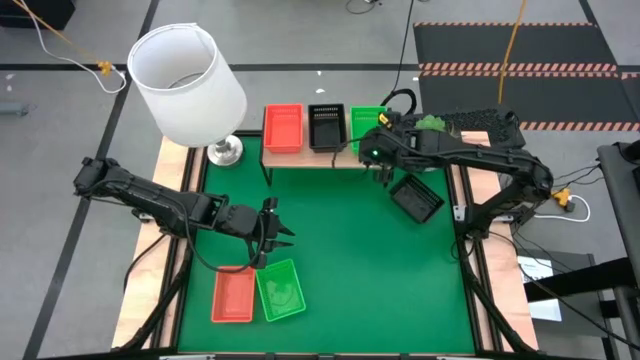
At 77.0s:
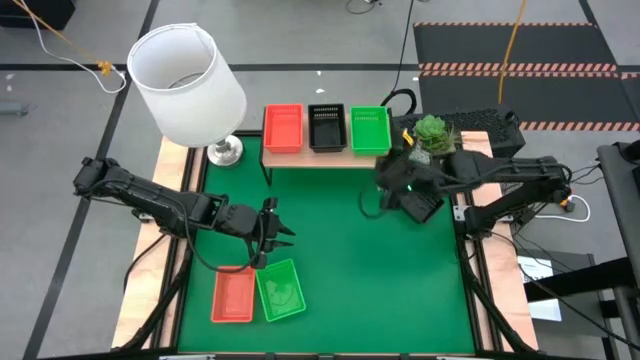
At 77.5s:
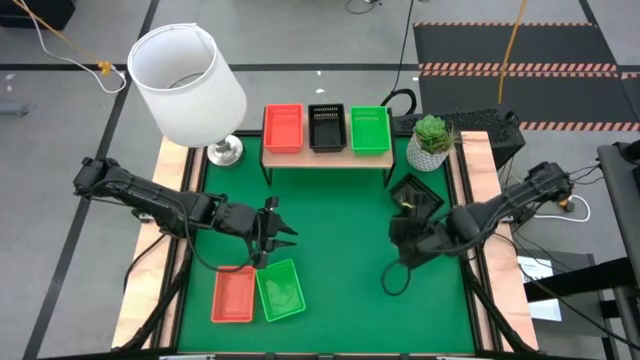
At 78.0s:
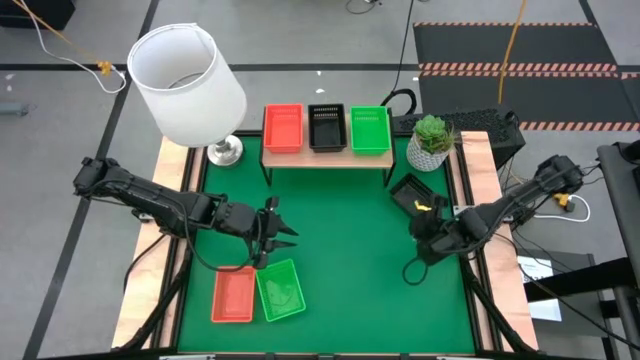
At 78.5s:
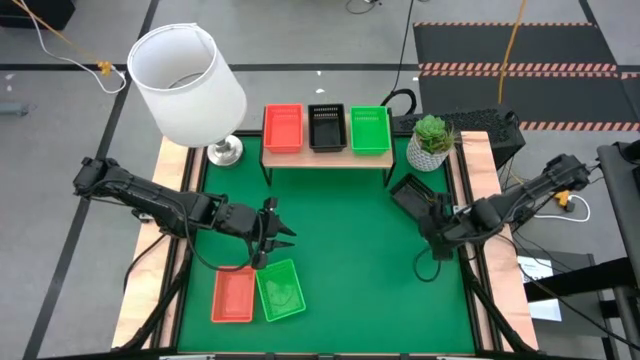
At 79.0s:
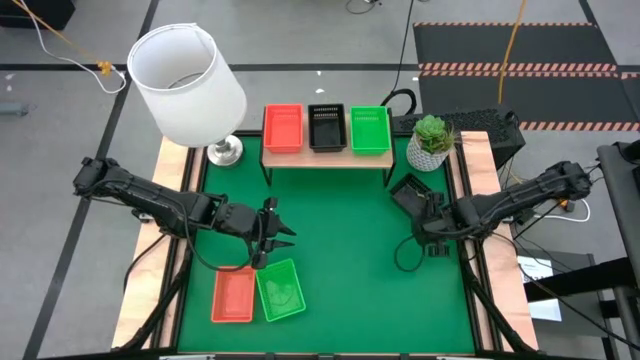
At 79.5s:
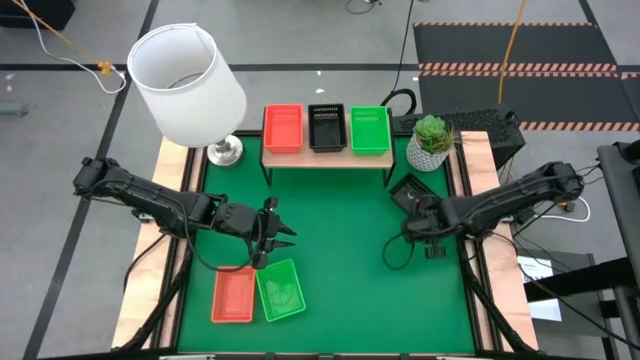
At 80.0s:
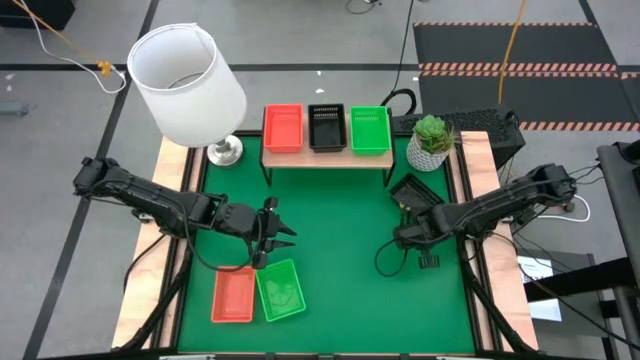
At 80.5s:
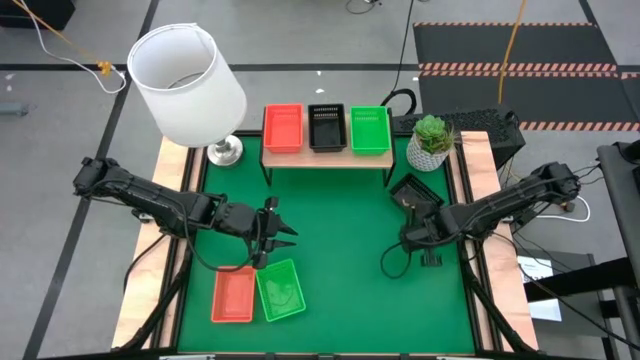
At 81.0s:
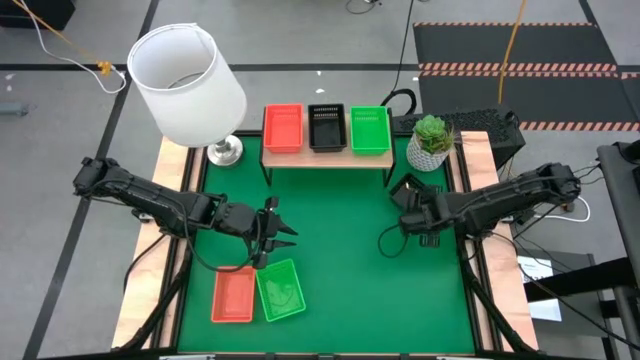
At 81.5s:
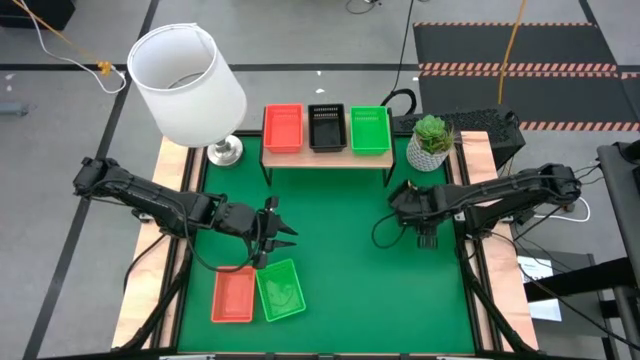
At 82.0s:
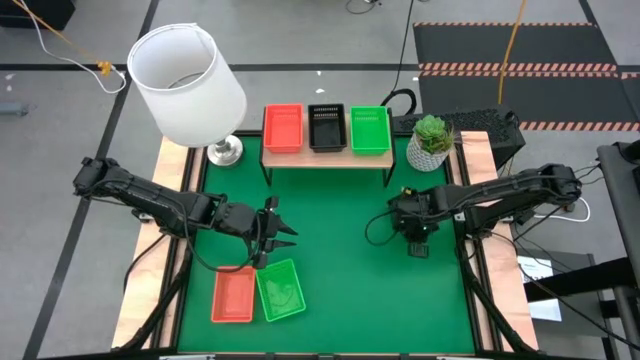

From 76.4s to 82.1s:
Task: Stack baskets on shelf by color
Stack the black basket into the black basket on the shelf

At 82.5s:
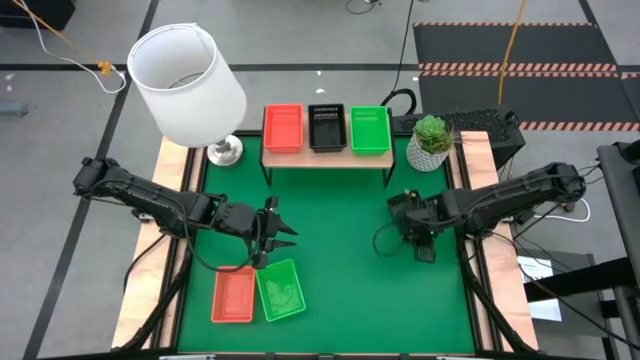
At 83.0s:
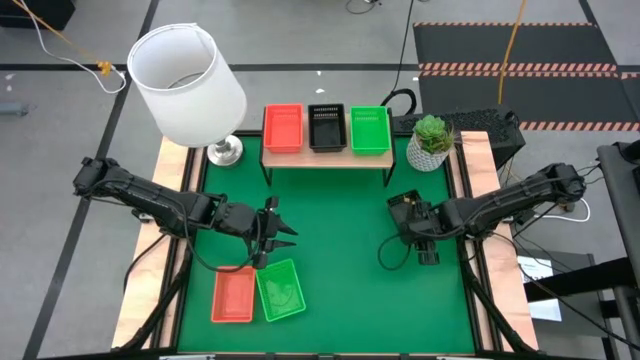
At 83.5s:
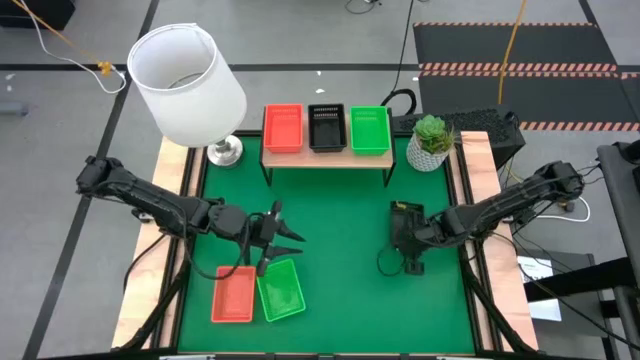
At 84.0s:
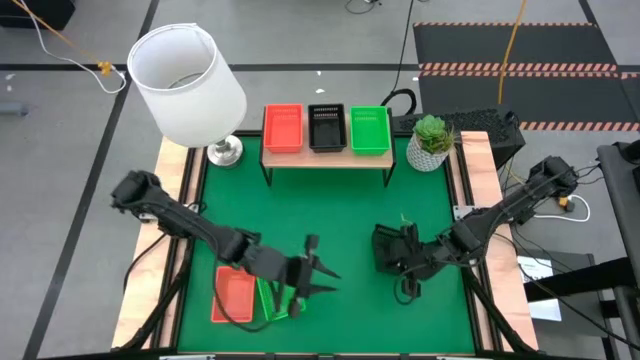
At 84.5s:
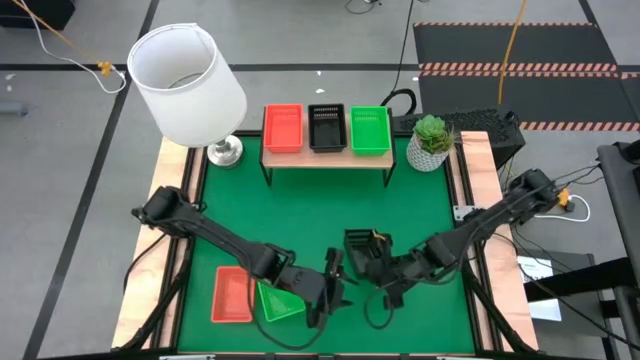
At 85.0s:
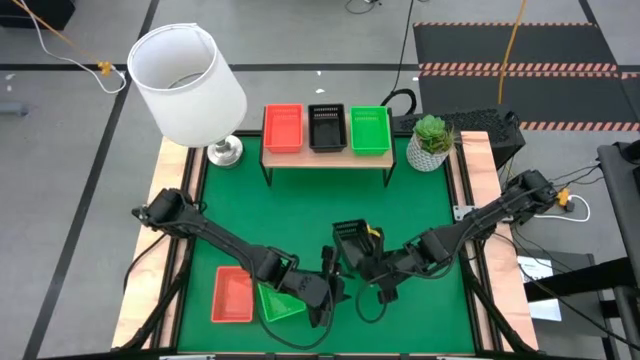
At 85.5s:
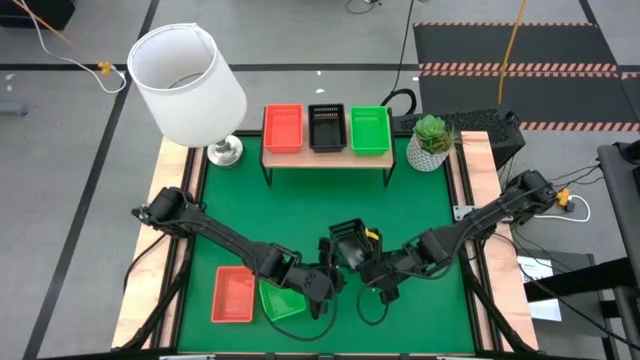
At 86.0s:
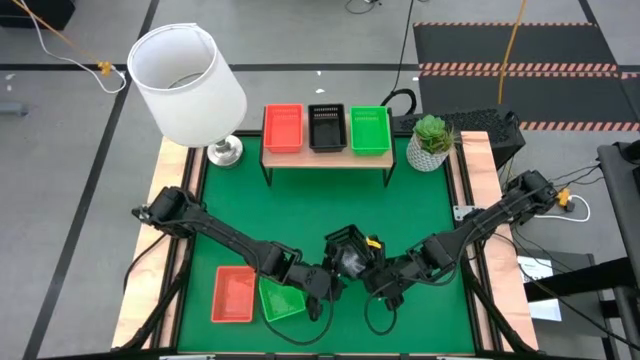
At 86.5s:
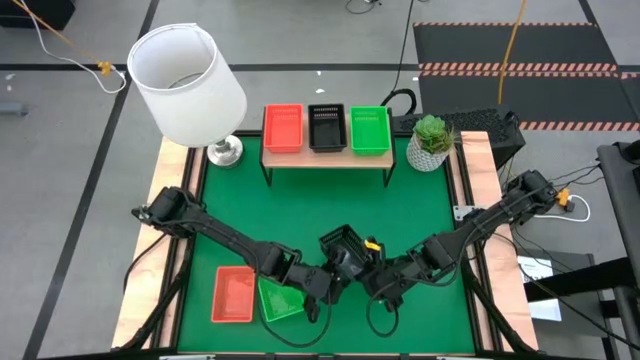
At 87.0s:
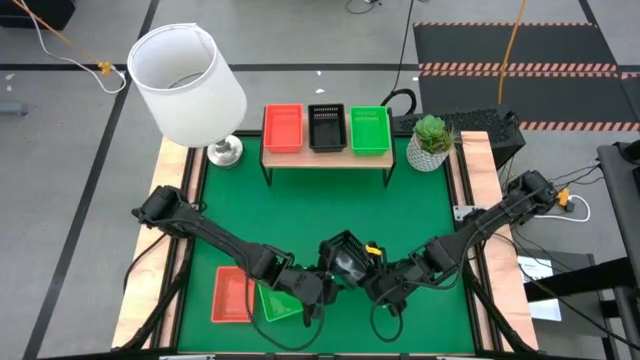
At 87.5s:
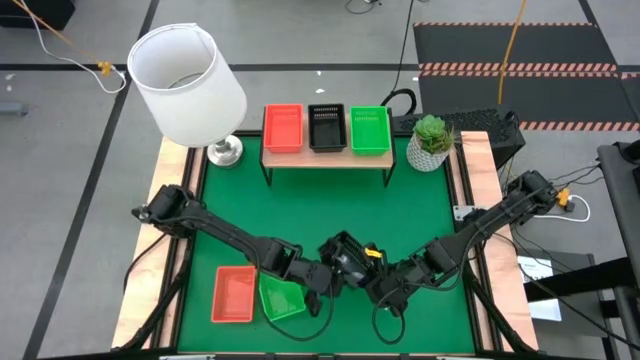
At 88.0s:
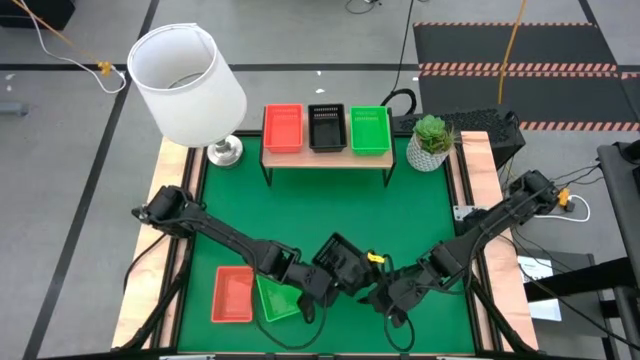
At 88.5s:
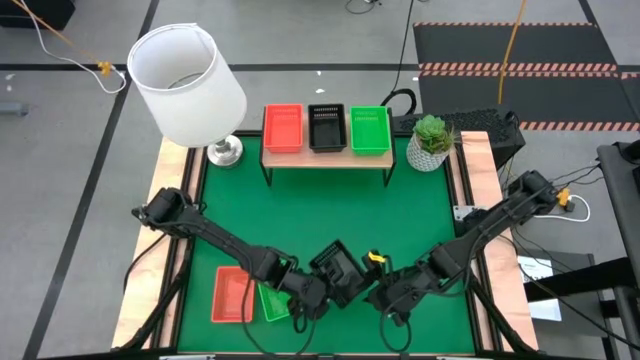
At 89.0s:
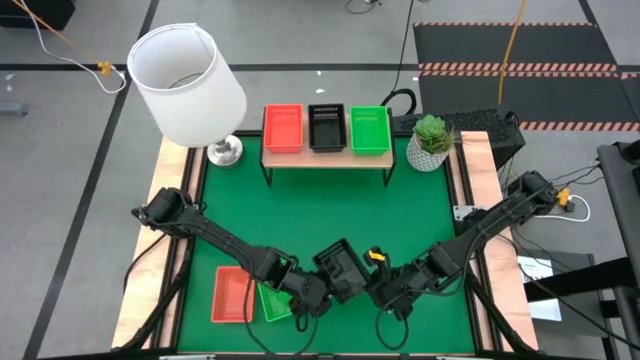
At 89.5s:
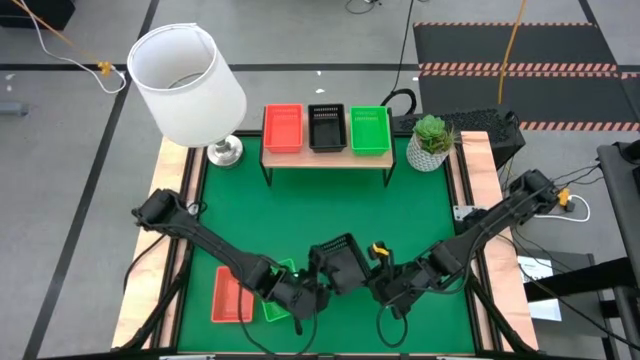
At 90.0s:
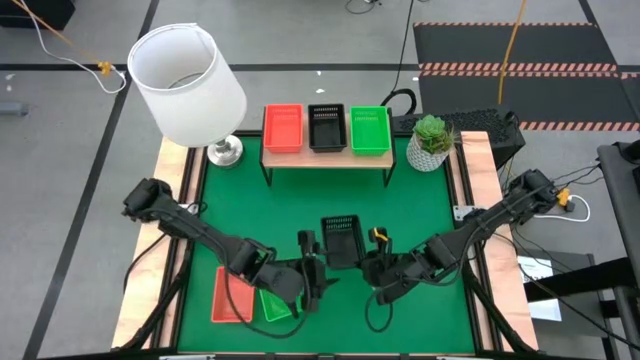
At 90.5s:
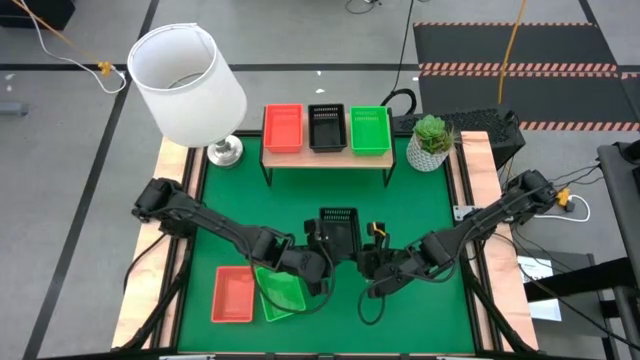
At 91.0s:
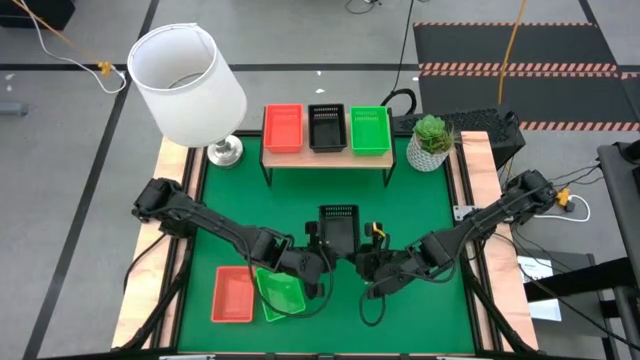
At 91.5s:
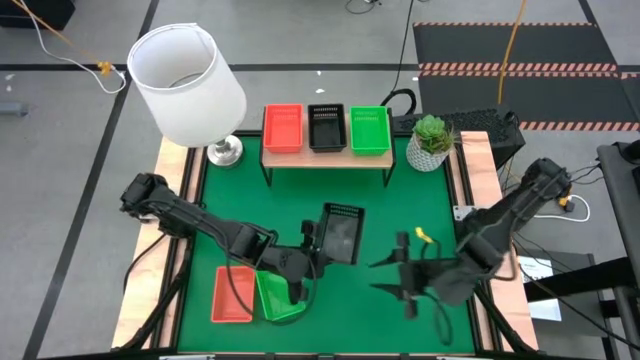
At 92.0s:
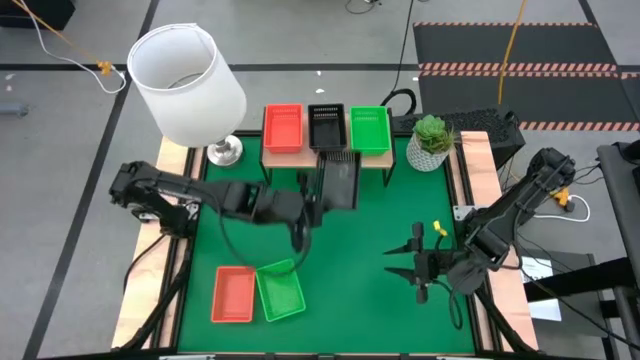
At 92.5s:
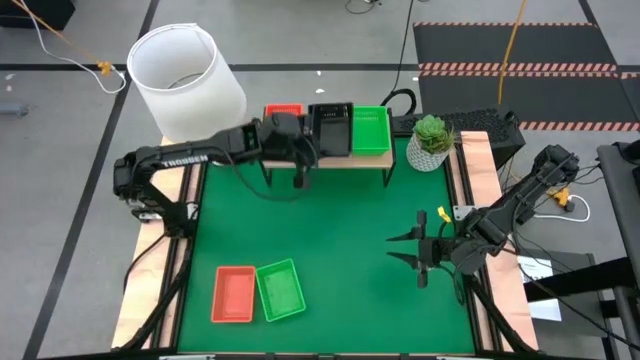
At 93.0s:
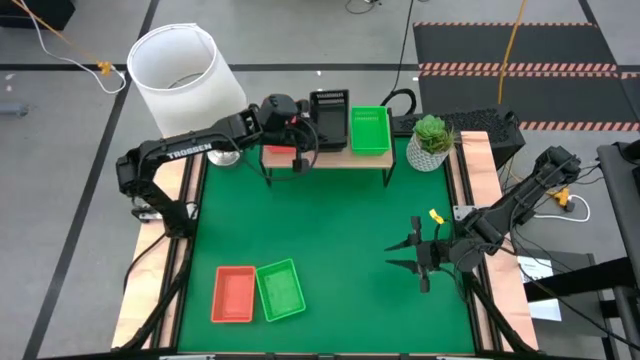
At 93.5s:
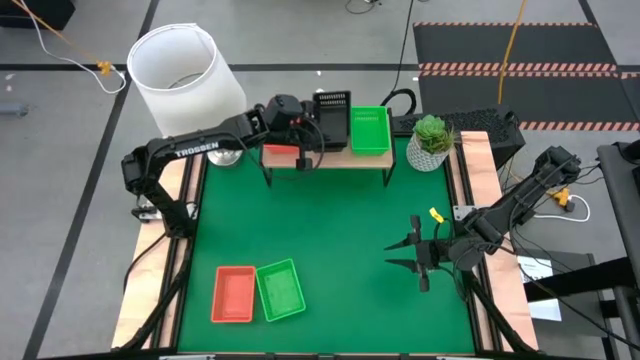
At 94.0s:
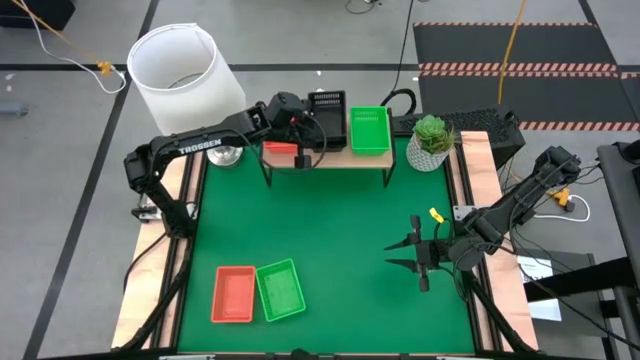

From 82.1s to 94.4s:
Stack the black basket into the black basket on the shelf

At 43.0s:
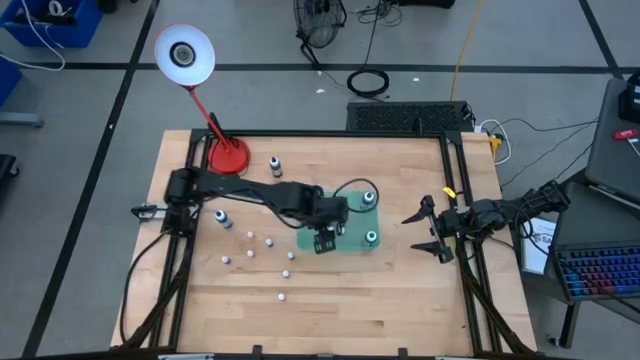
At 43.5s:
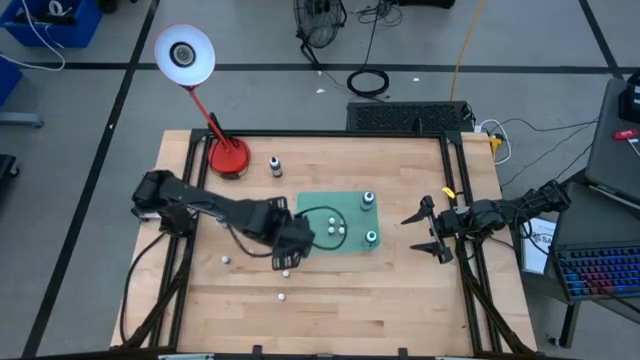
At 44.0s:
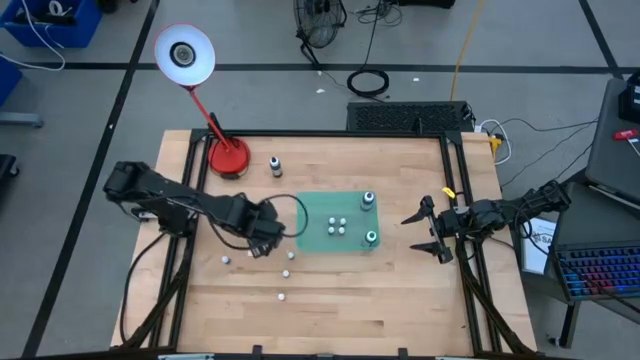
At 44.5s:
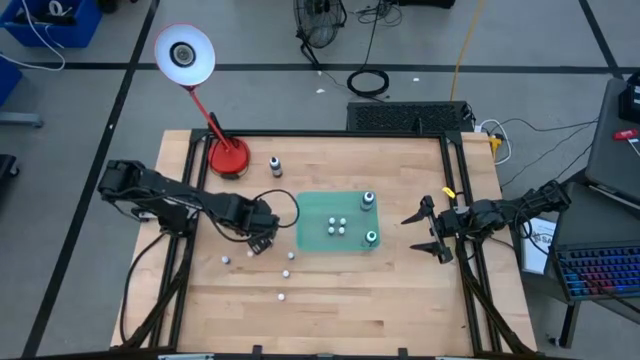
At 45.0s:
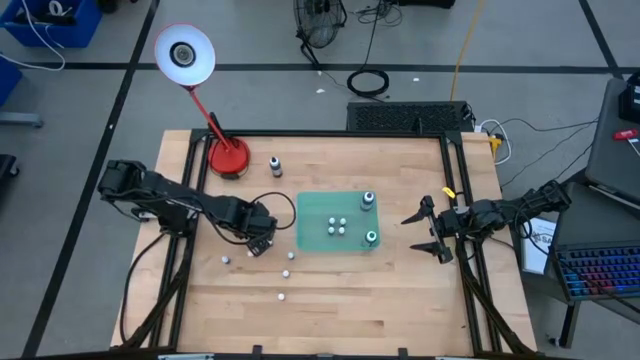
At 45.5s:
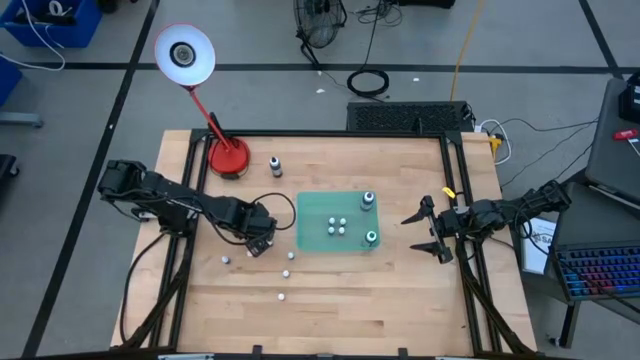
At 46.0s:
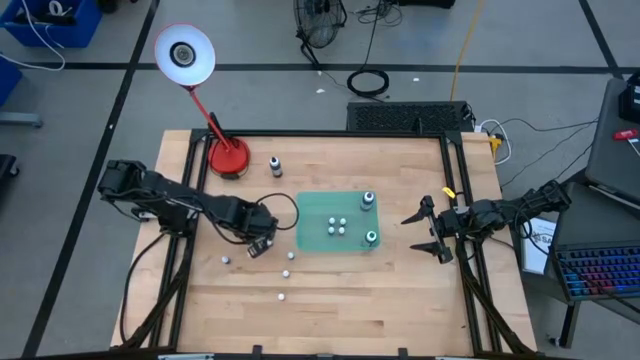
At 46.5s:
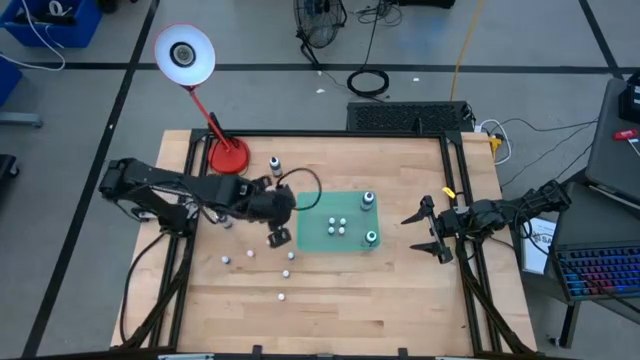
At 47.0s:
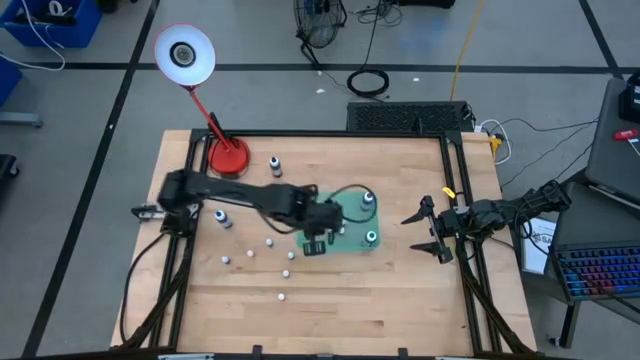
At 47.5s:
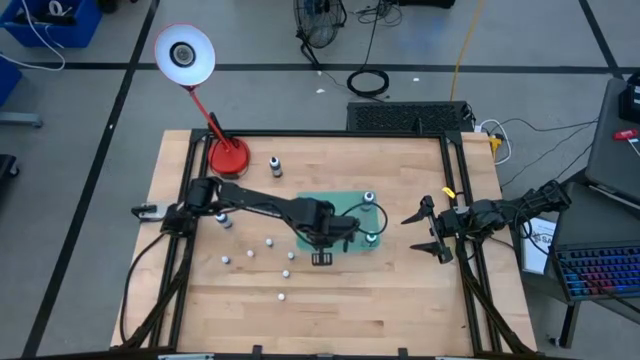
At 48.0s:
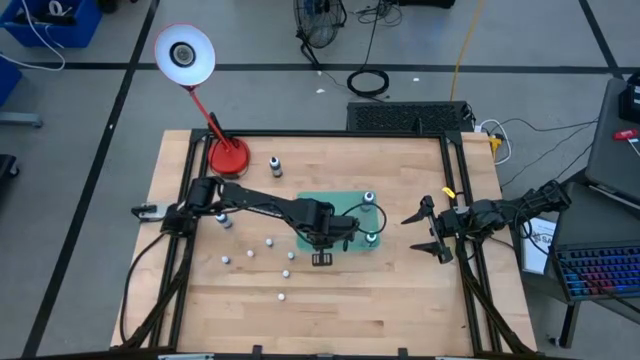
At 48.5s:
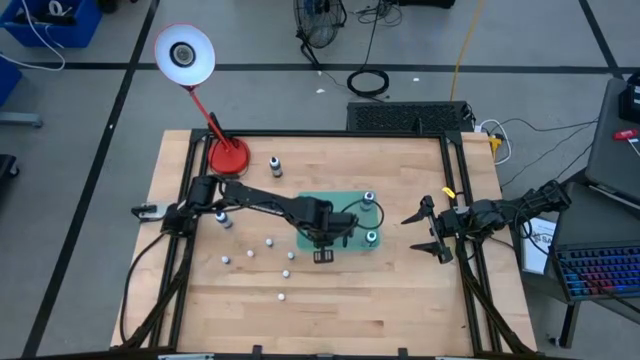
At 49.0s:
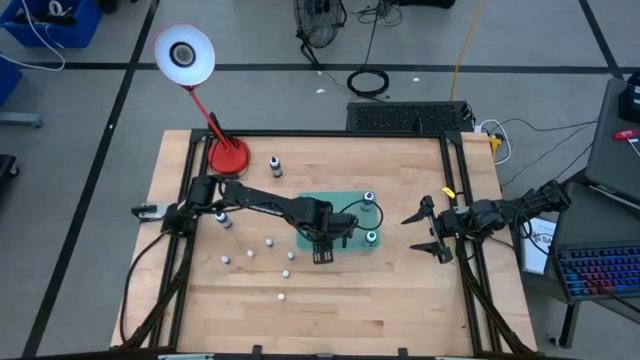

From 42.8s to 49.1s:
Task: Pick & Place food coloring
Put the small orange food coloring bottle into the blue bin
